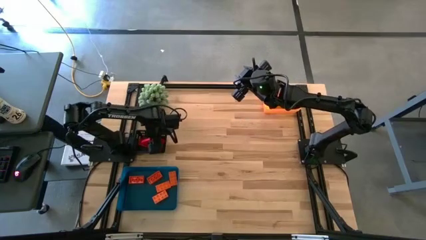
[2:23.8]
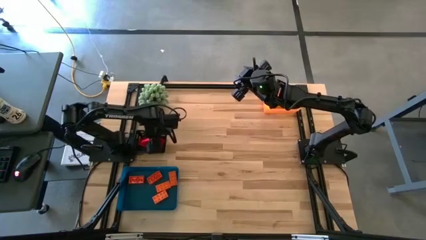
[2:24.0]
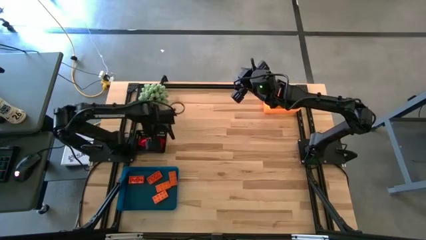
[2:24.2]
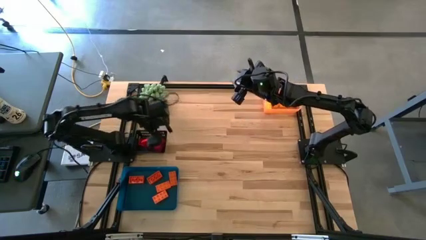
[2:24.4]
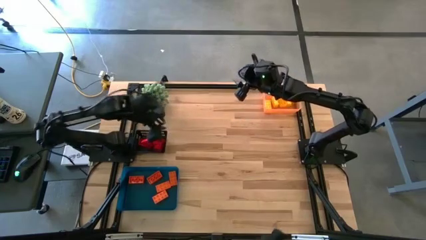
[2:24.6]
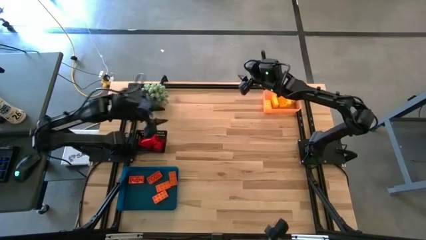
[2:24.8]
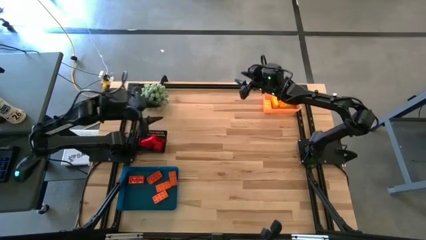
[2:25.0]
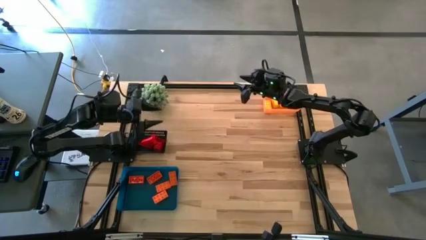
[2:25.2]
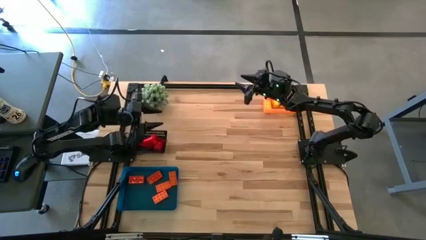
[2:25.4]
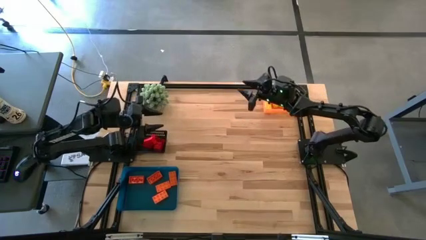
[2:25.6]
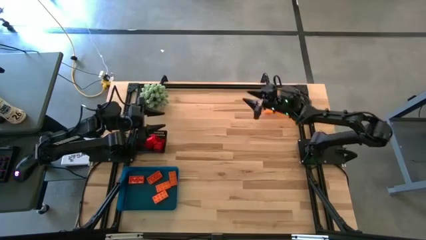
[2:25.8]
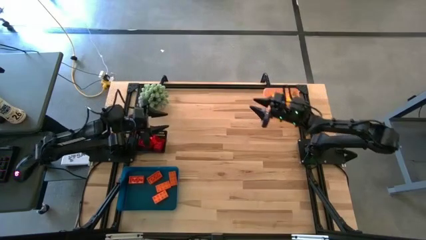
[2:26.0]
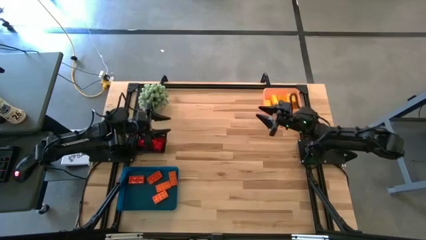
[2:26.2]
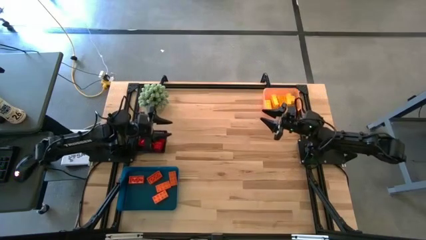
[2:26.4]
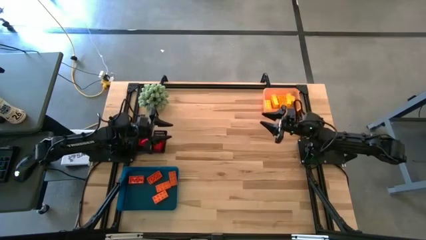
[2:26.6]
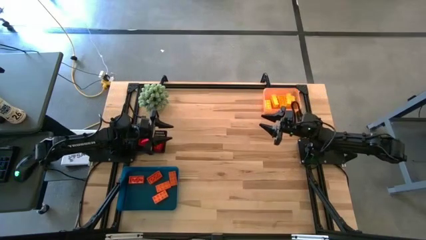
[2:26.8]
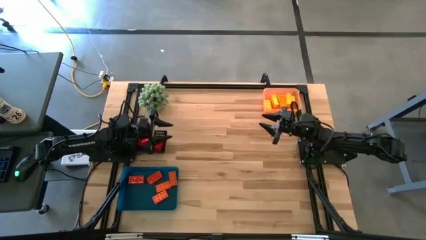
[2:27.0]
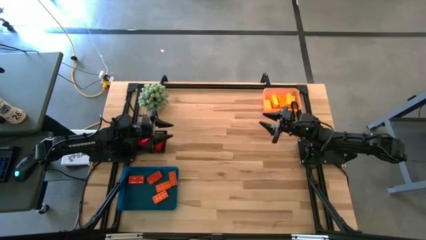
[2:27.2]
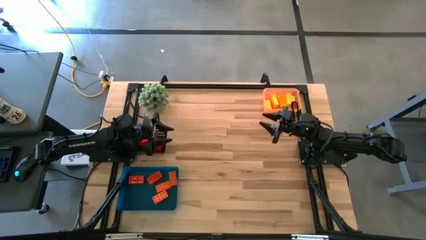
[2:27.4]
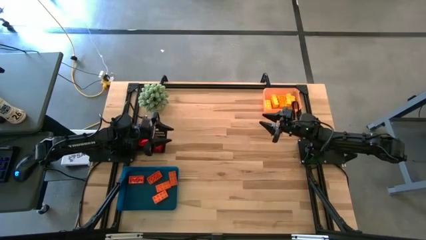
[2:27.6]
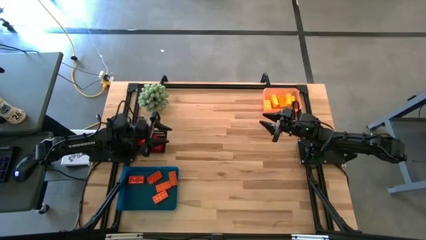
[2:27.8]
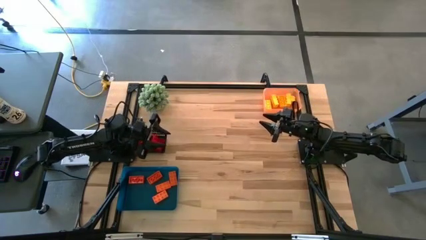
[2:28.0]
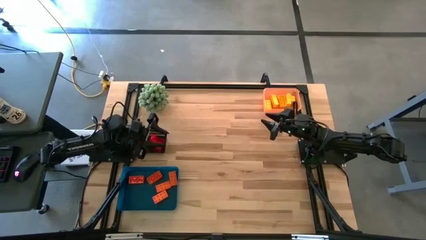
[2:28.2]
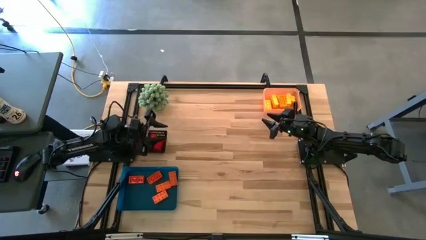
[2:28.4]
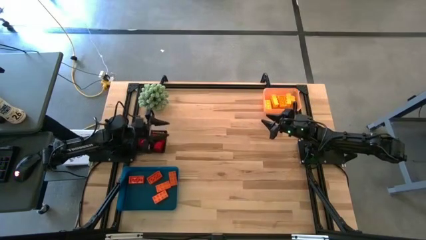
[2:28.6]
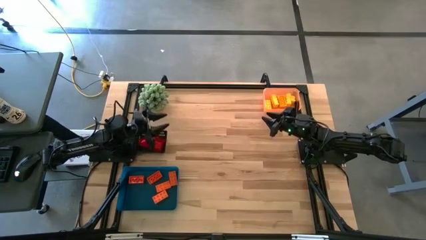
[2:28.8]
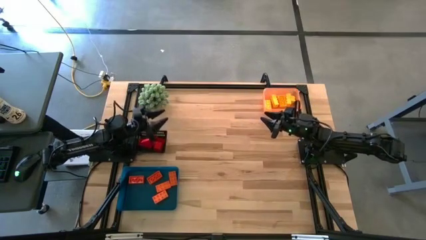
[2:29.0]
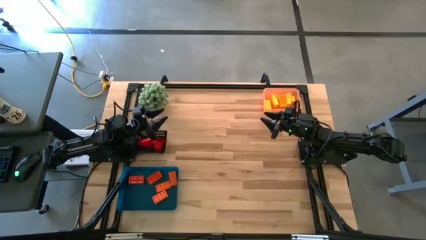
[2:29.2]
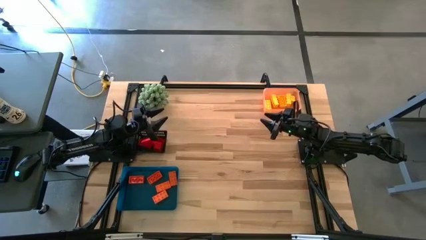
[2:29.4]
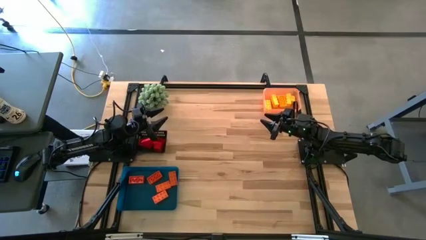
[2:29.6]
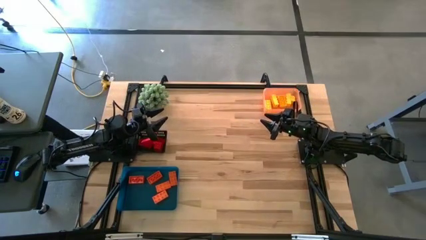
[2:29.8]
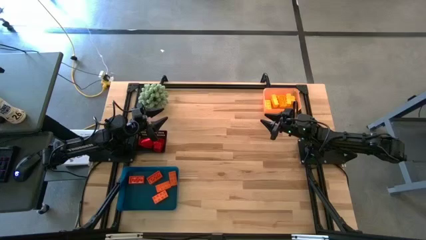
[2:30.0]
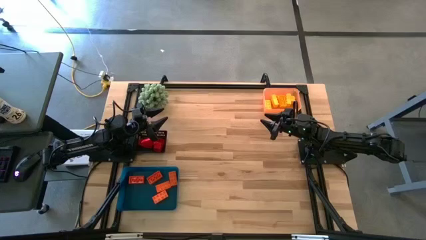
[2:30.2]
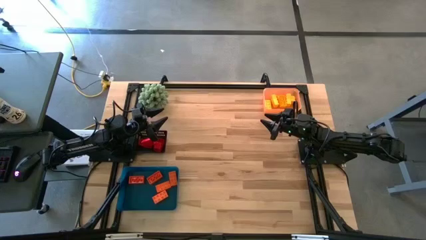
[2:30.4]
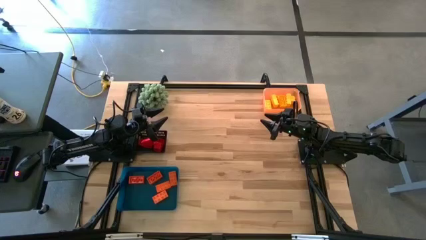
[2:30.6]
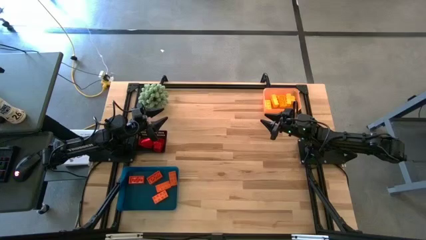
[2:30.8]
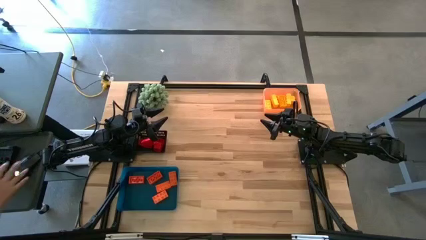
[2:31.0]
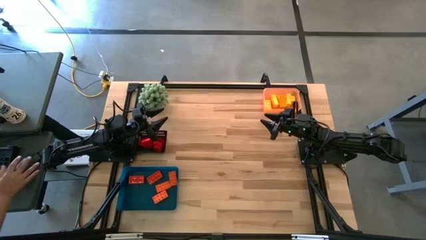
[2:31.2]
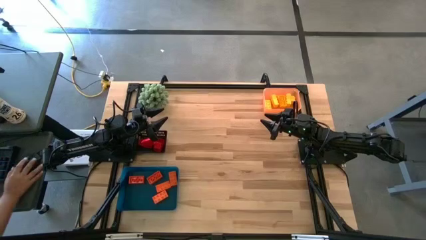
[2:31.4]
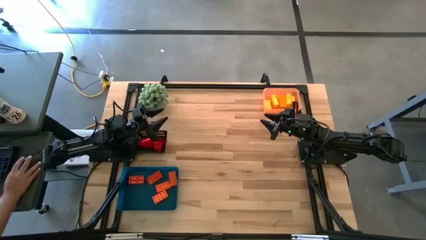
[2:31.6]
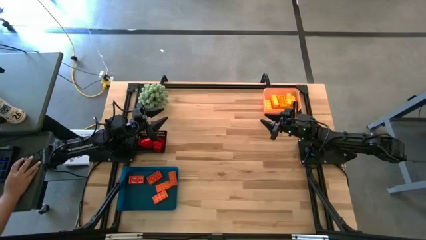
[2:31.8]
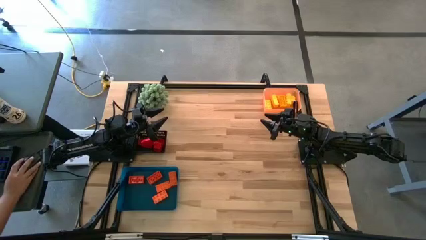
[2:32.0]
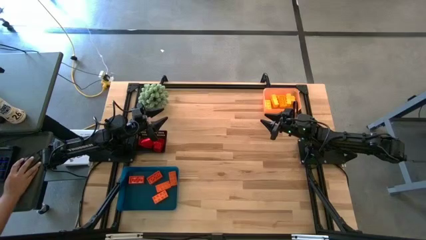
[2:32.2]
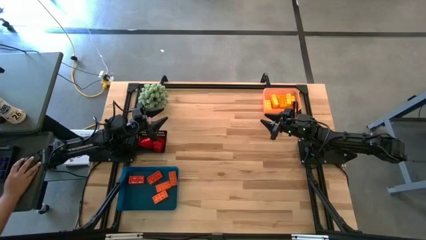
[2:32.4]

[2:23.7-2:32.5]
Task: Sort & place blocks by color
Return to Home Position

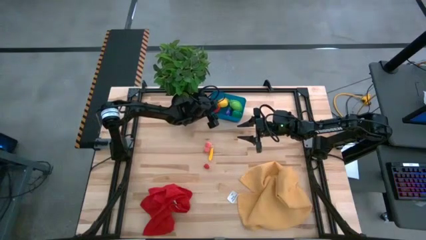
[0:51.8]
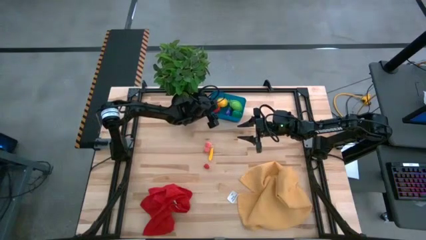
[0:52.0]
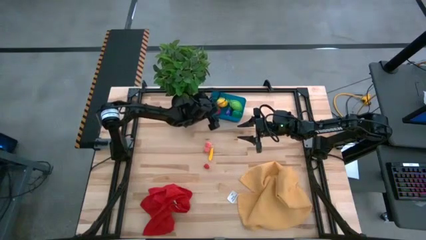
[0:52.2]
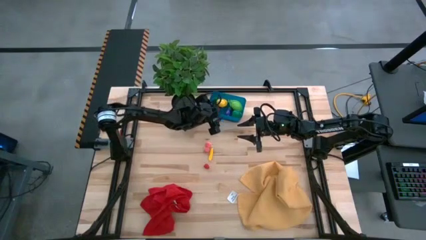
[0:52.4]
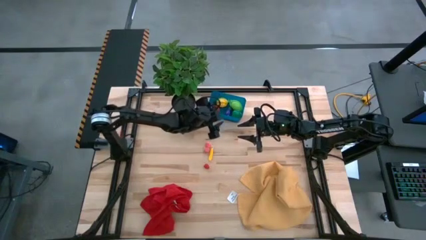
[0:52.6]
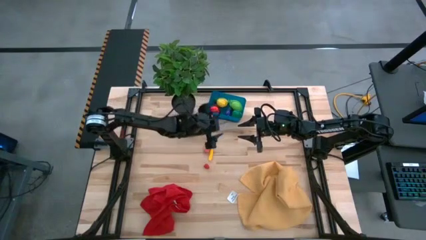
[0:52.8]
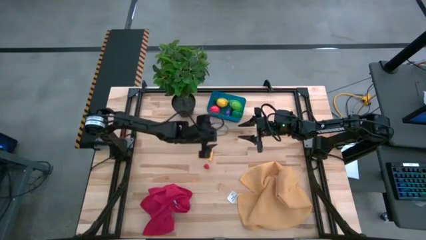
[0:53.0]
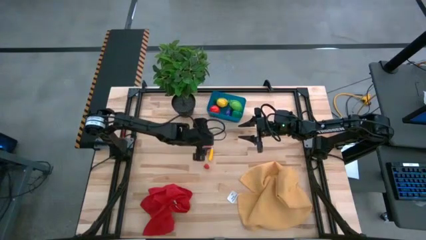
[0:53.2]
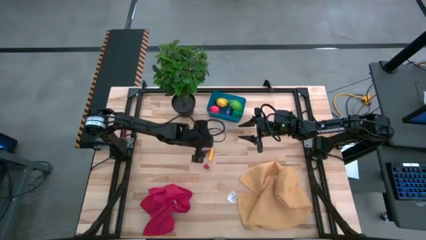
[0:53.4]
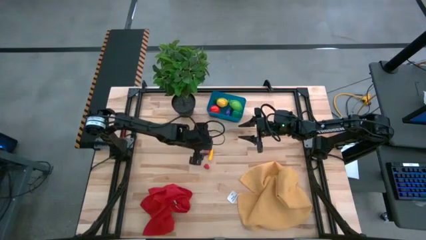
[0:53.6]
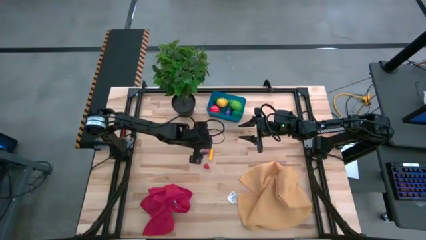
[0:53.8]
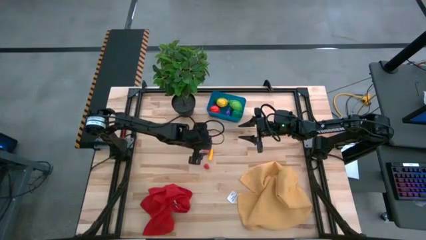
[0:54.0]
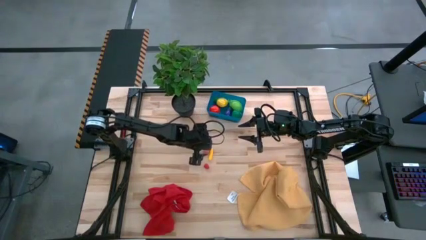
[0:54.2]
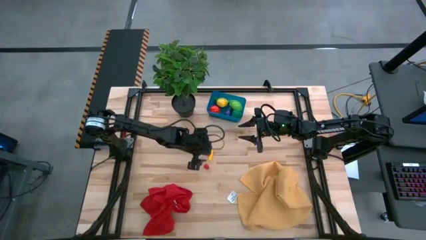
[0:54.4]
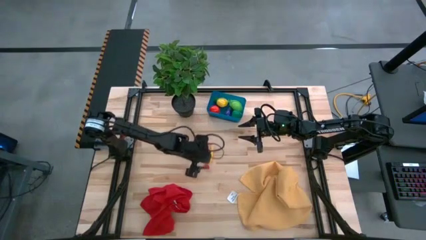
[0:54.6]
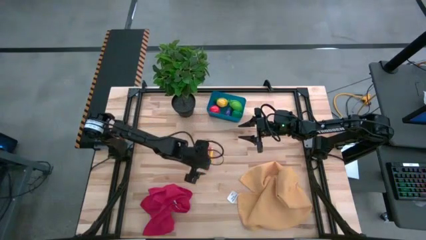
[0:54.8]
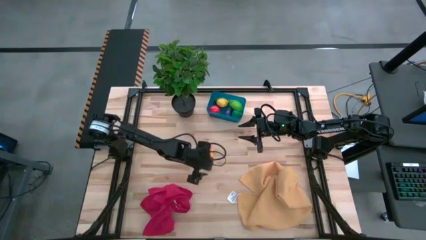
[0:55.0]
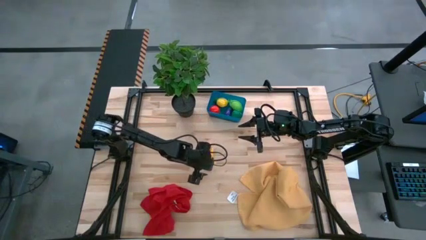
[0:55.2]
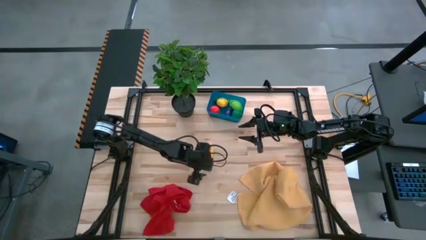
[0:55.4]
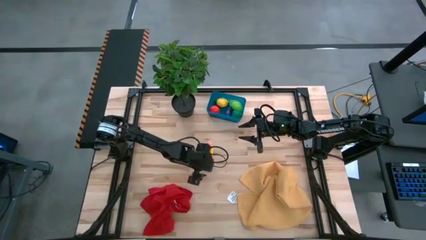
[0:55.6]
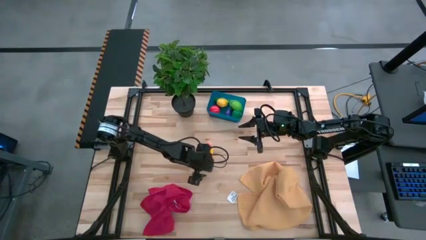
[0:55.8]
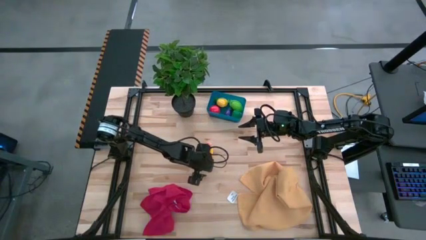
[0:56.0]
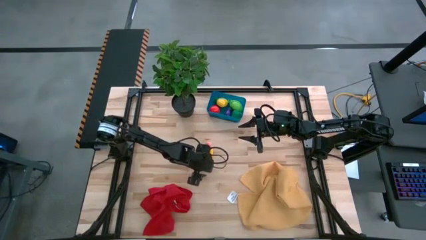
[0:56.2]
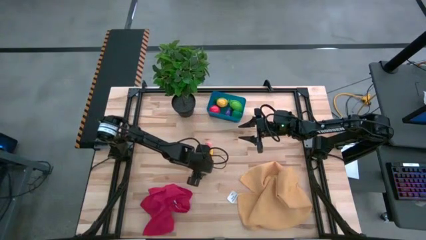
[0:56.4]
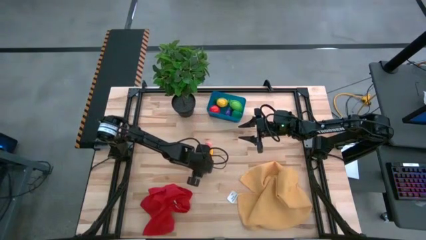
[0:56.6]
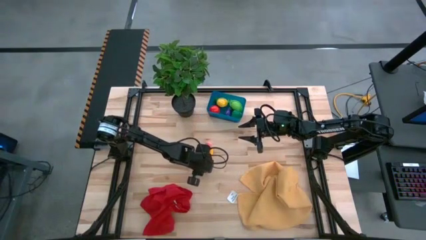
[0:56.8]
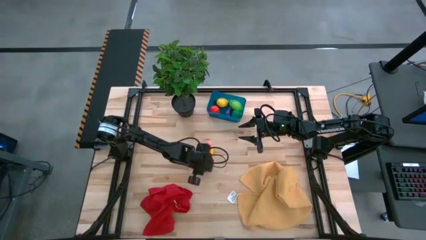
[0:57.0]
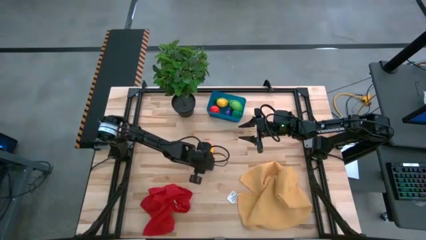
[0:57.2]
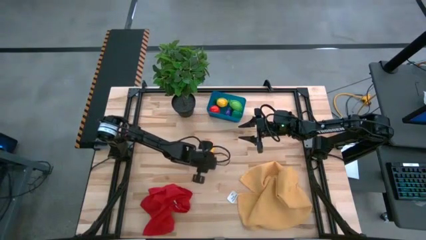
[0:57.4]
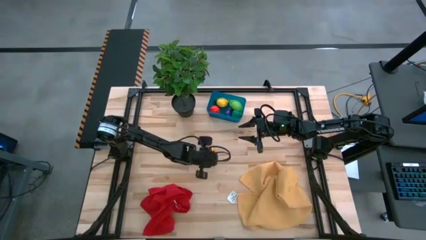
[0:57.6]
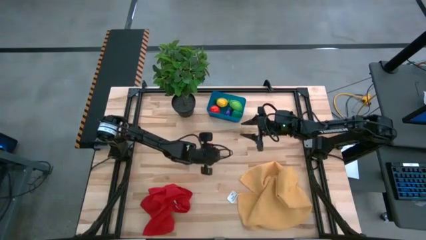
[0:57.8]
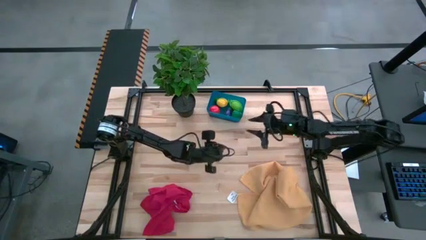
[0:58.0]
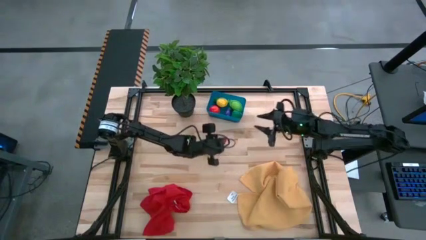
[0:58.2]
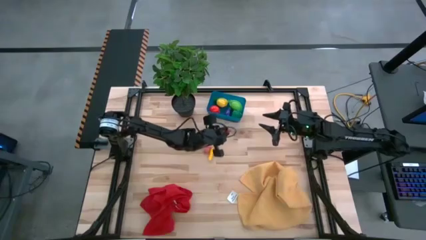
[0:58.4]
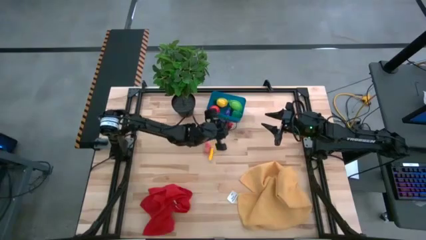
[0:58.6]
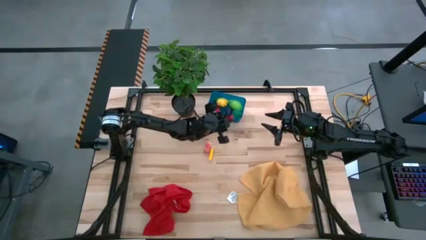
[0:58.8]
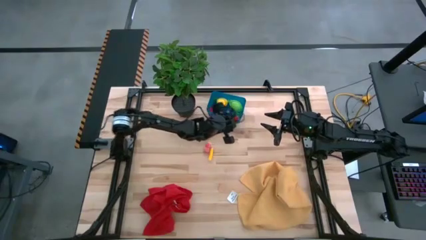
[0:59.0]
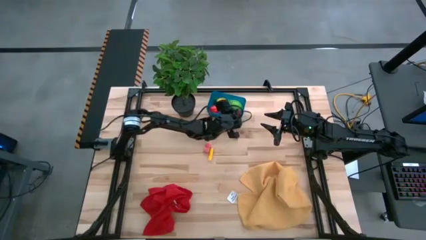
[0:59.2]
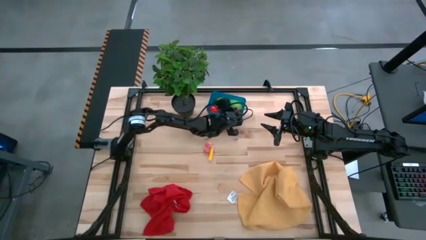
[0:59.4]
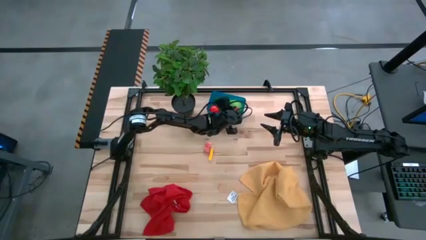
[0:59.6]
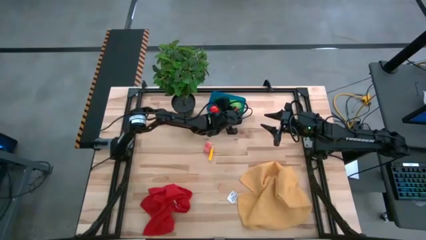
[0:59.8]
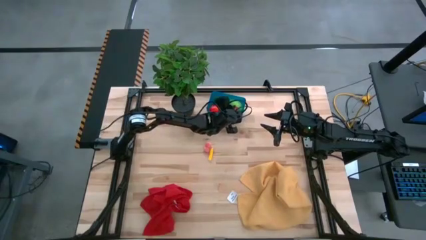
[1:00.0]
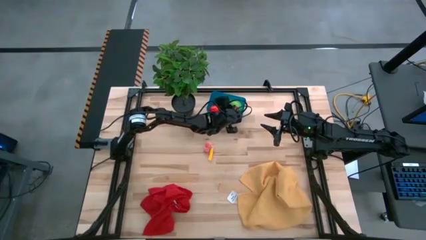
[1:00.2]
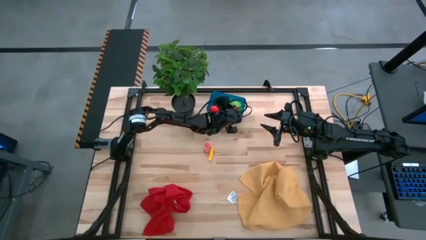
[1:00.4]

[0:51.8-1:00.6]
Task: Pick and placing Produce into tupperware
Put the red raspberry into the blue bin
